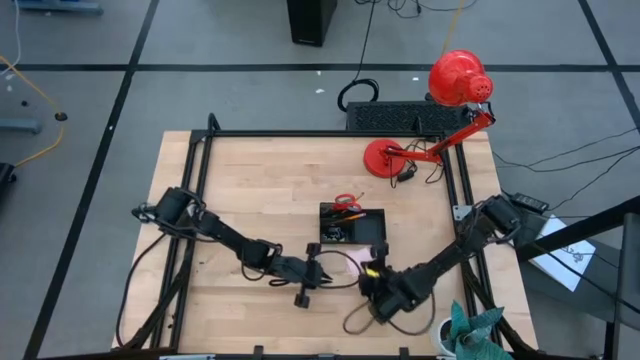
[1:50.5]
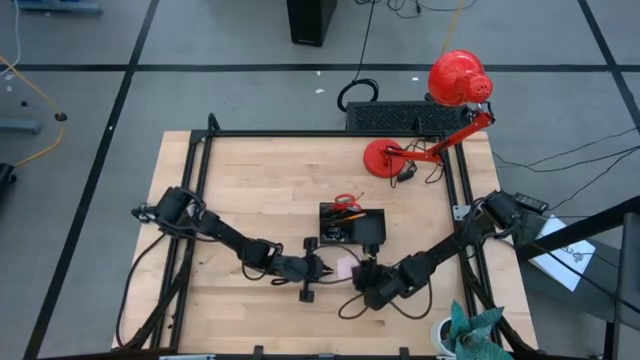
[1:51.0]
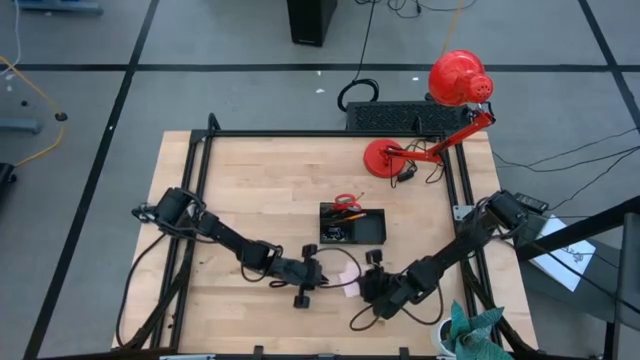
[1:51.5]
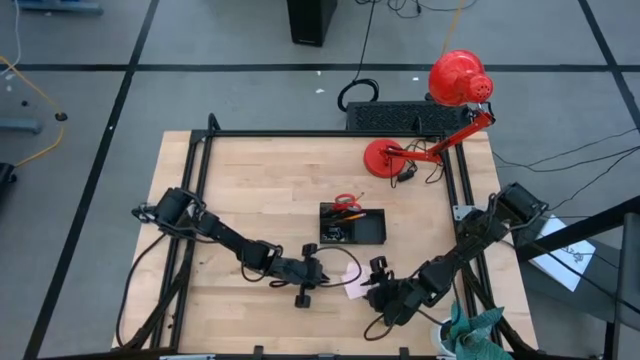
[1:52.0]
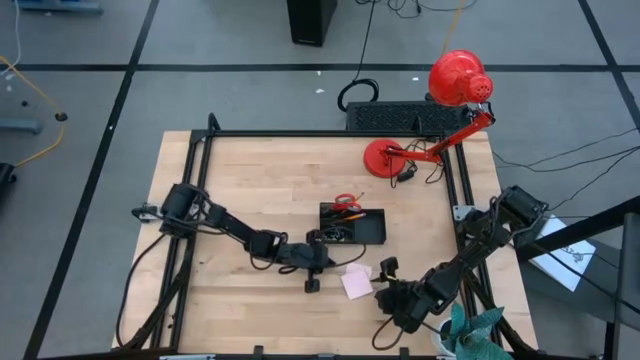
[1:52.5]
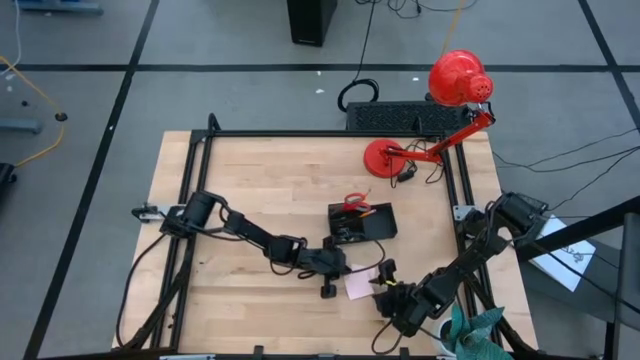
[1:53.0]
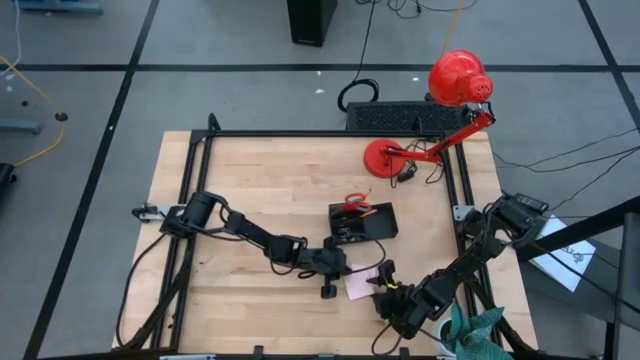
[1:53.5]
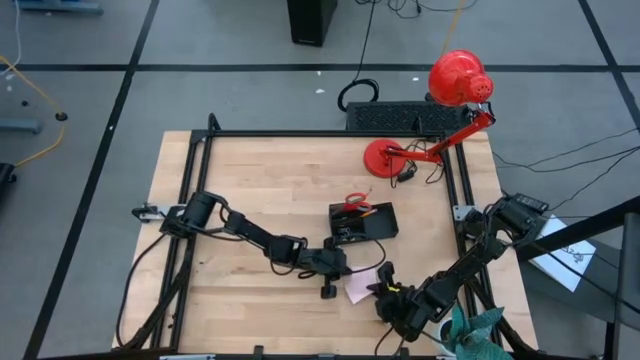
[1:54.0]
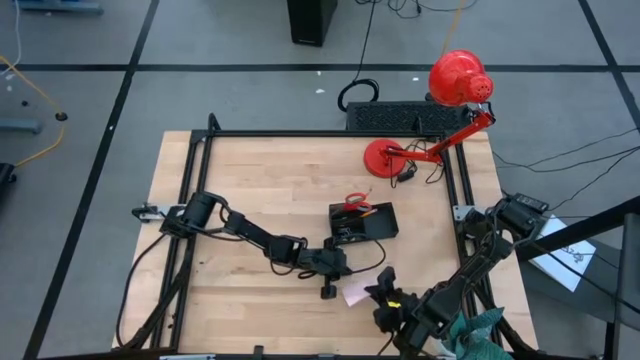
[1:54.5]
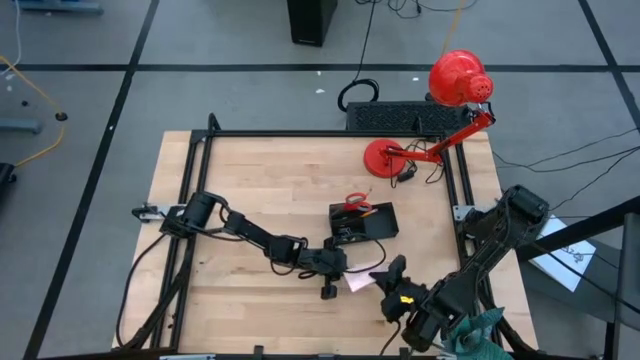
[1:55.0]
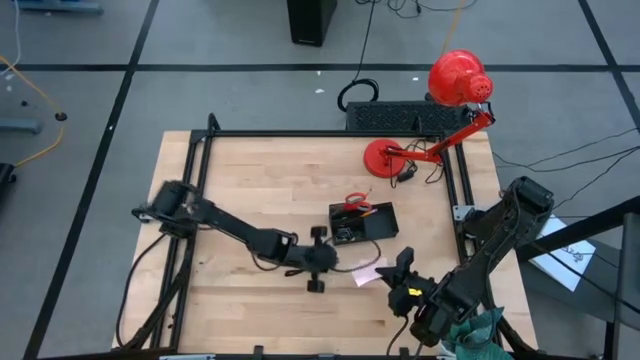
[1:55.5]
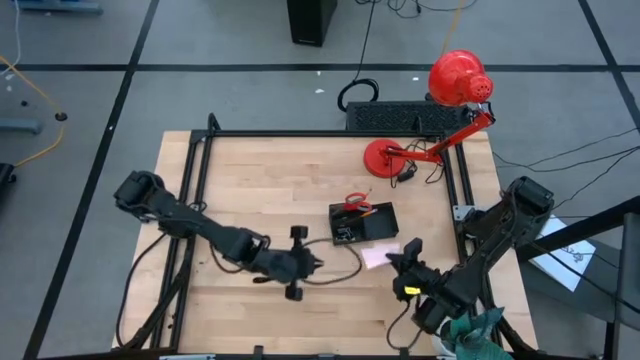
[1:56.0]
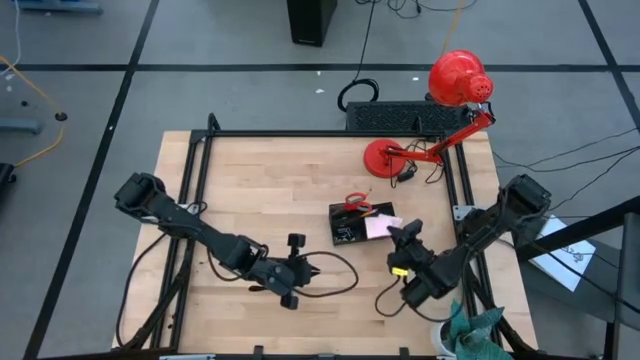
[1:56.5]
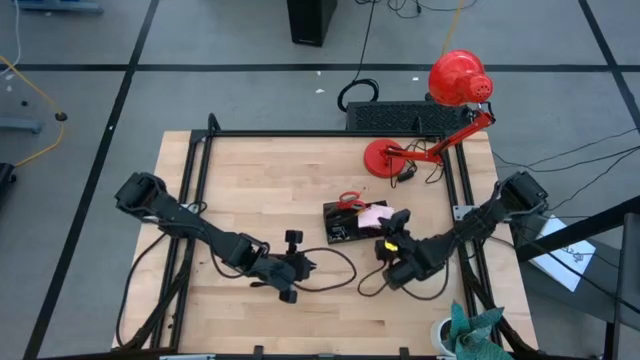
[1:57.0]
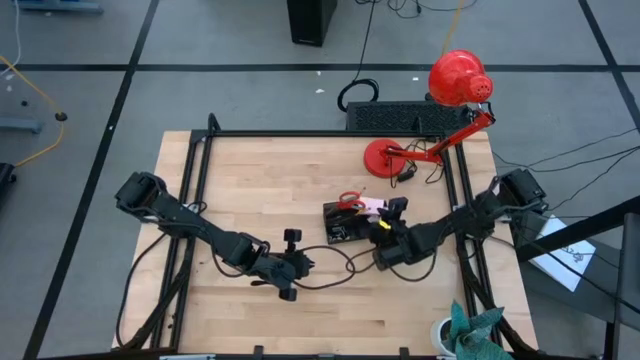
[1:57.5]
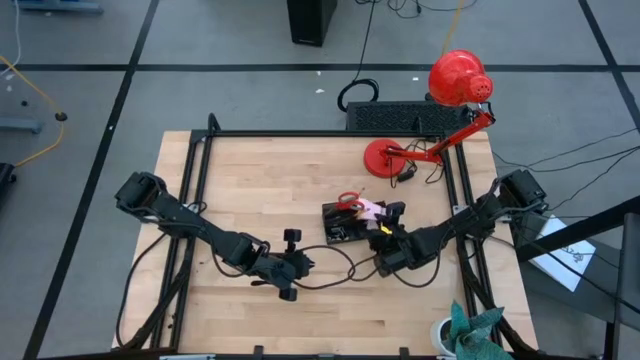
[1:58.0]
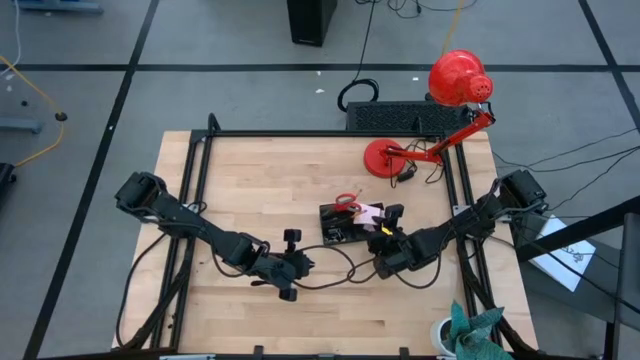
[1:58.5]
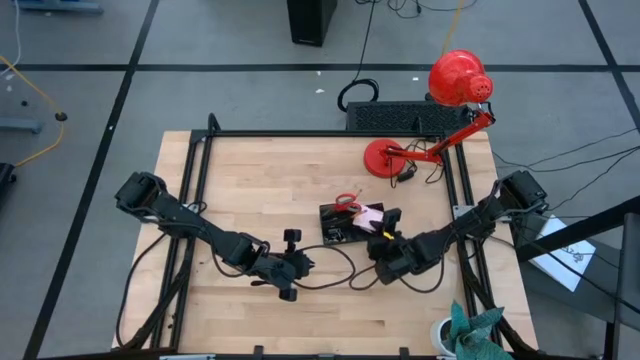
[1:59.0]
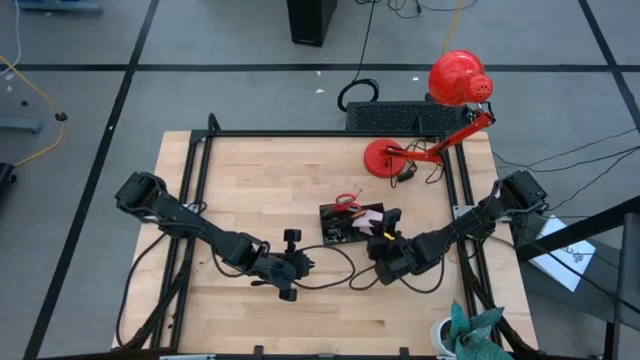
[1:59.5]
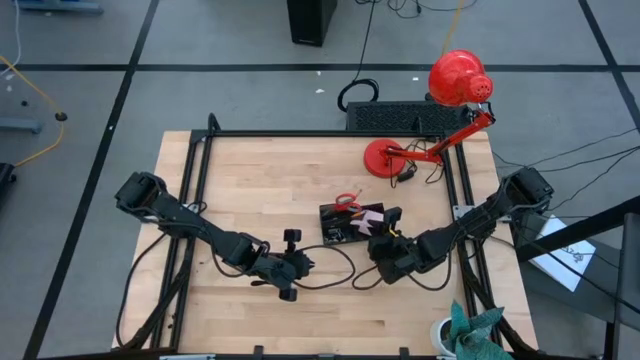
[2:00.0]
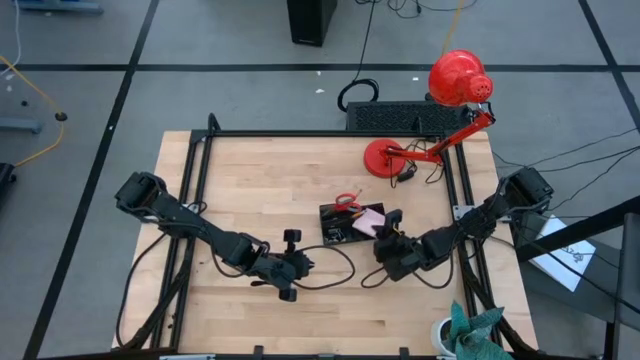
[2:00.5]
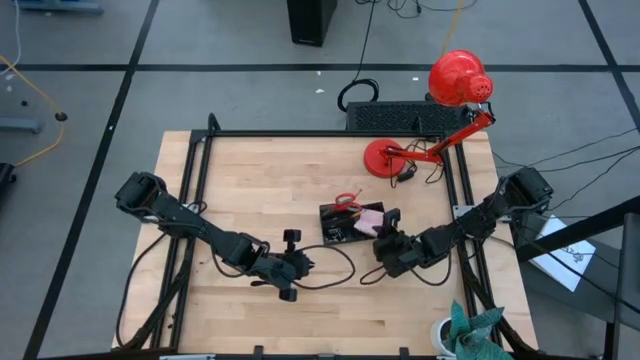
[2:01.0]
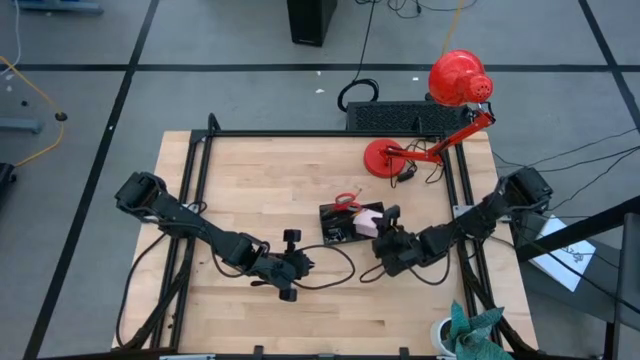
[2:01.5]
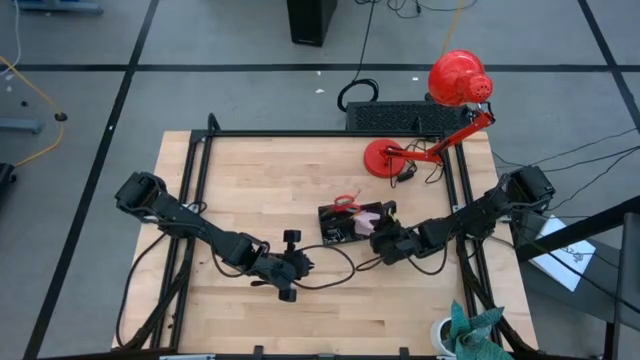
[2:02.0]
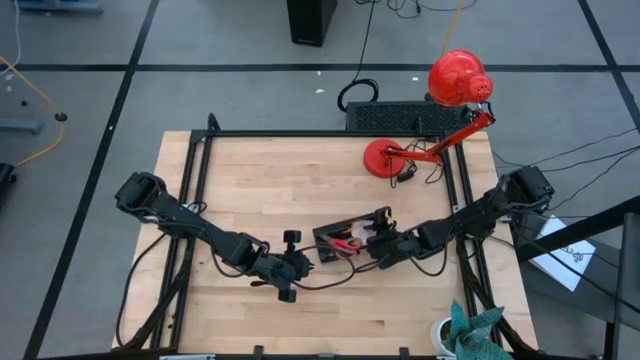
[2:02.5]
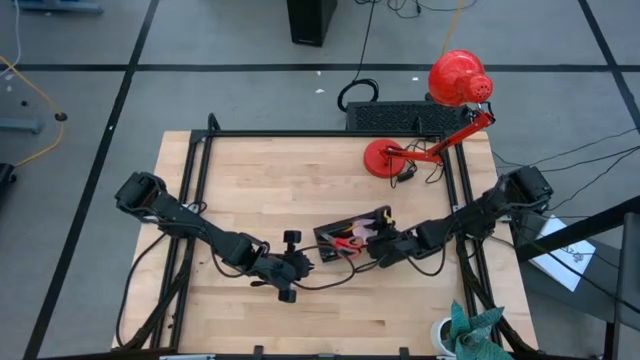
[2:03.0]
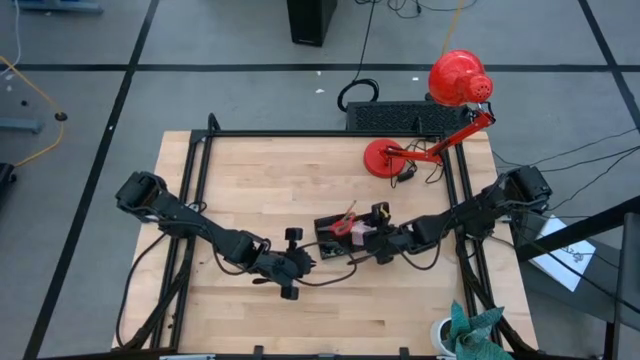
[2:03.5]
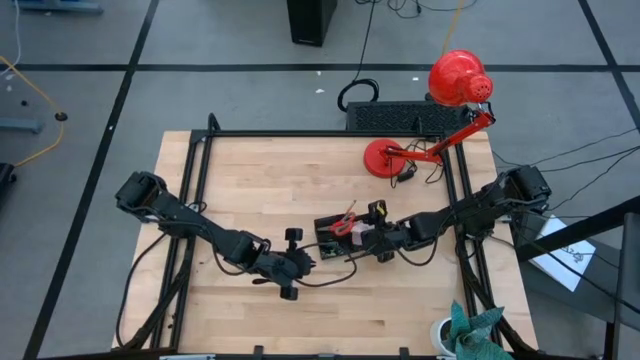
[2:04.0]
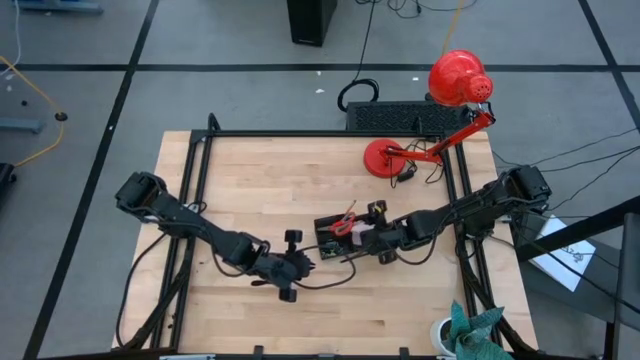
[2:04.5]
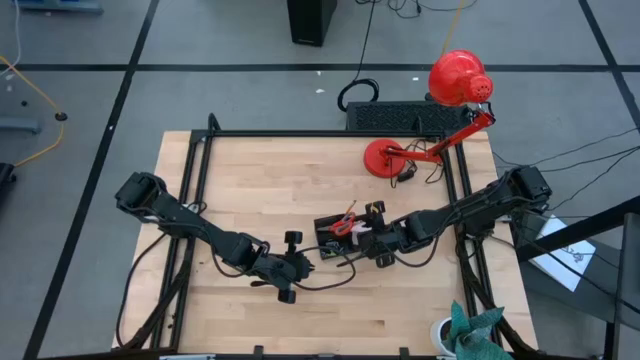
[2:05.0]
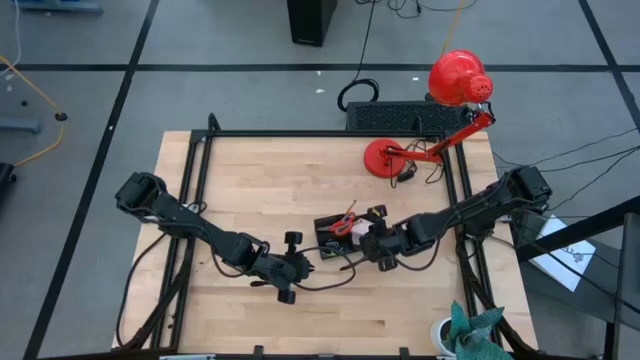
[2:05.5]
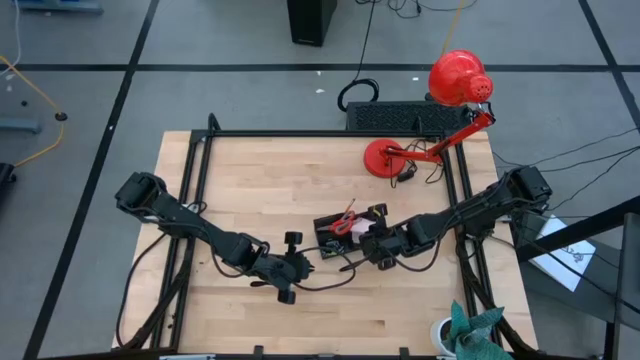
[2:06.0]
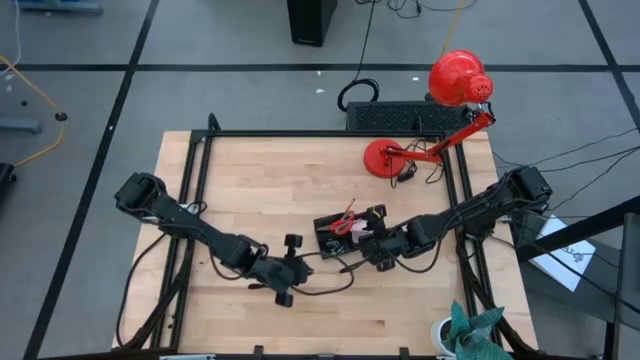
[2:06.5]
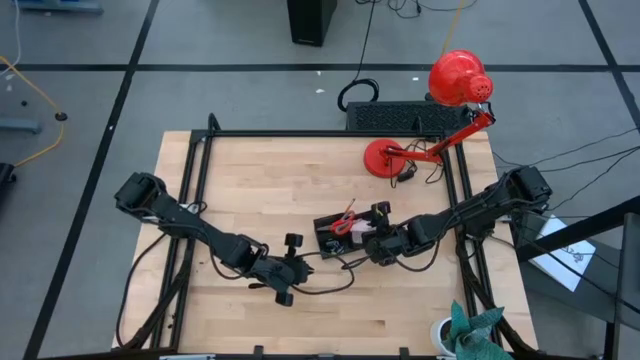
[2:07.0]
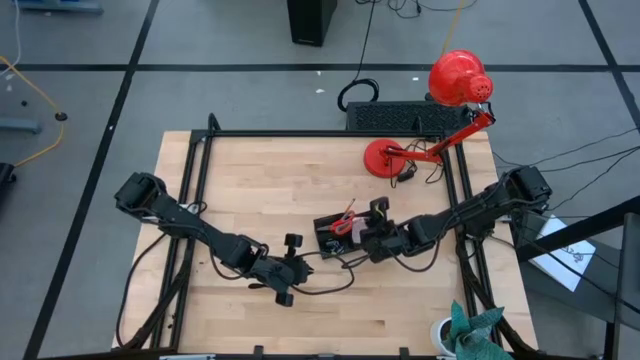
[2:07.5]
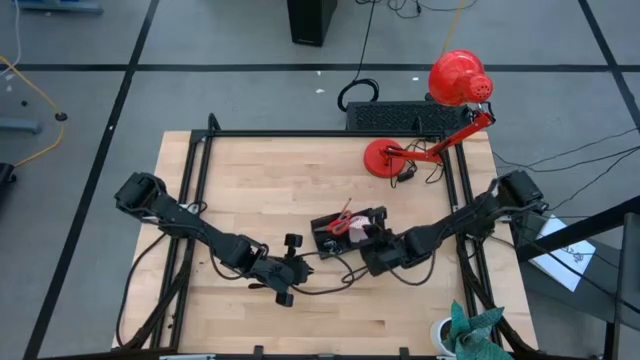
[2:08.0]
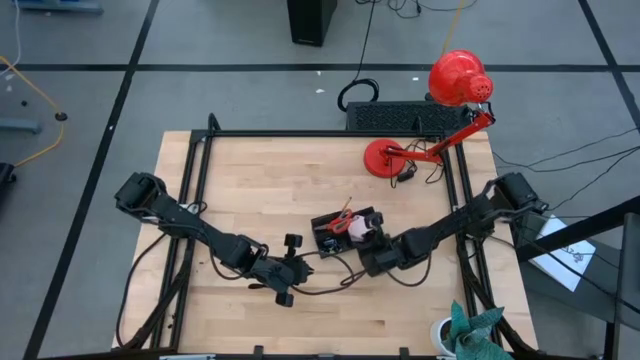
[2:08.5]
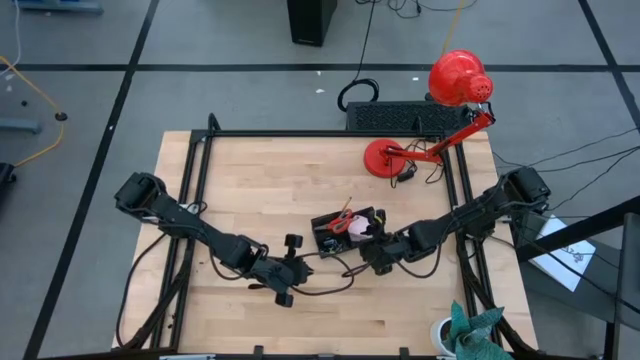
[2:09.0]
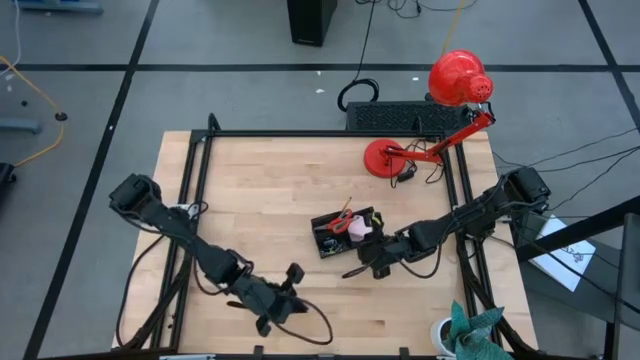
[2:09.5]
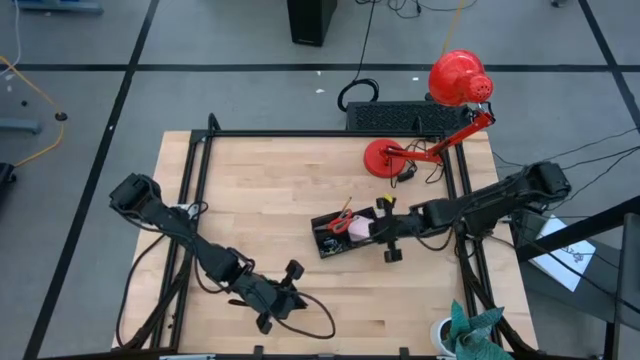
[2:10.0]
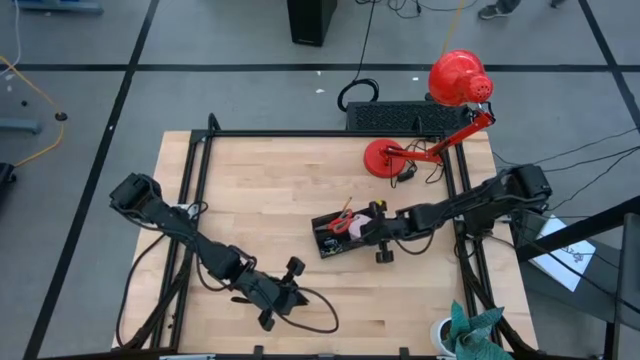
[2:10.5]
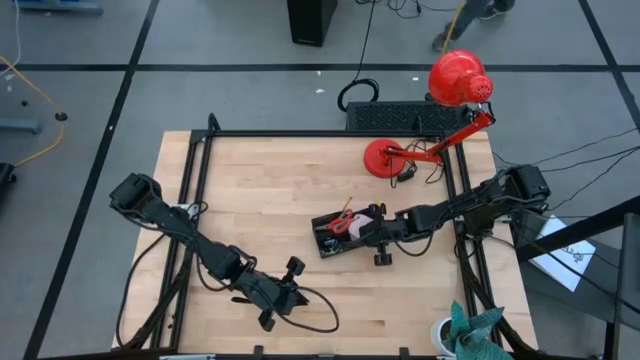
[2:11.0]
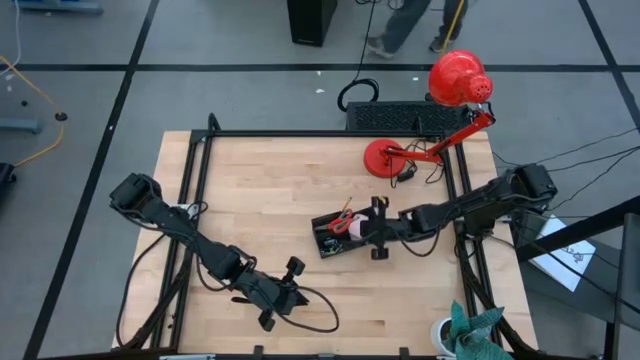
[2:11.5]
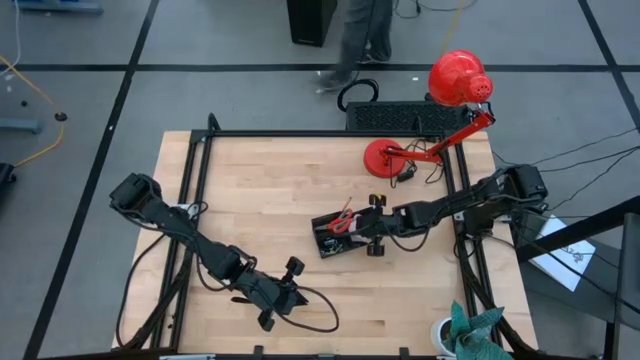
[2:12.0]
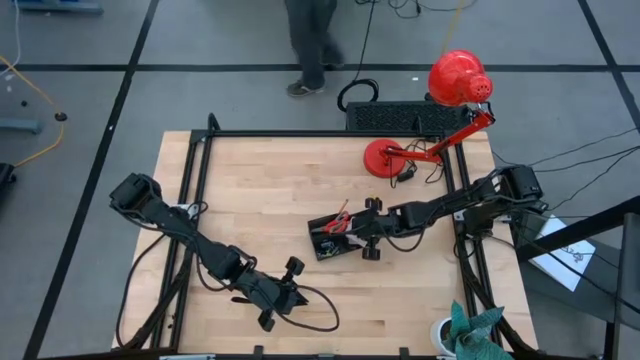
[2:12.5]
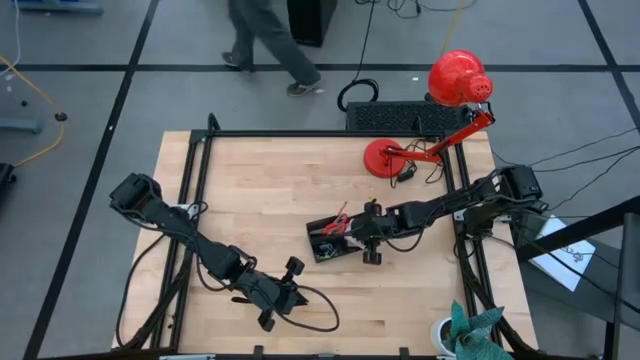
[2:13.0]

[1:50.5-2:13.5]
Task: Pick and place office supplies into organizer
Put the sticky notes into the desk organizer
